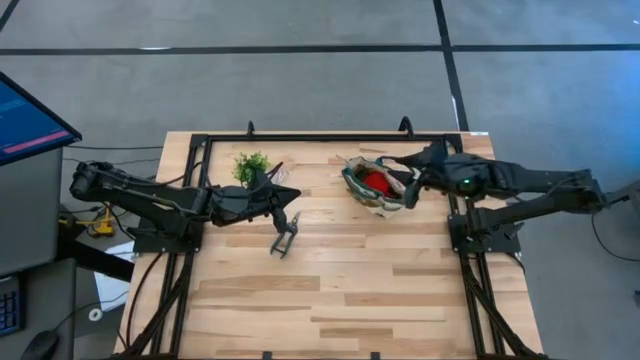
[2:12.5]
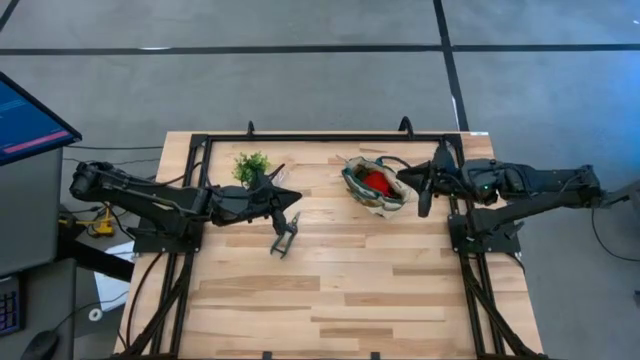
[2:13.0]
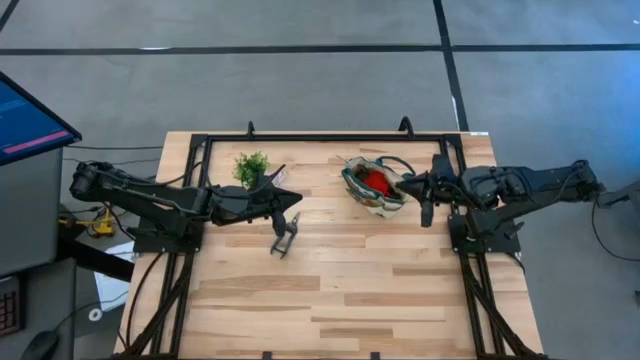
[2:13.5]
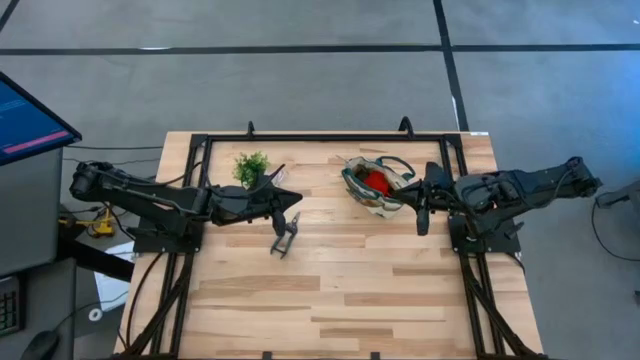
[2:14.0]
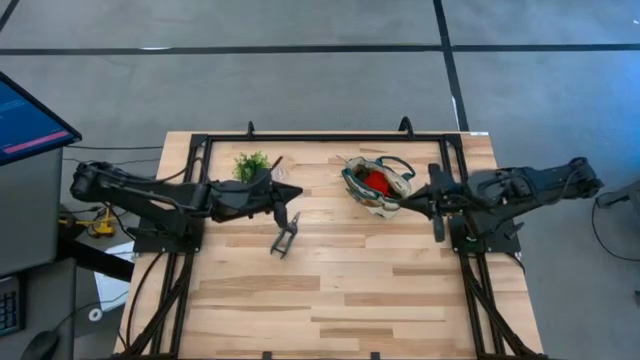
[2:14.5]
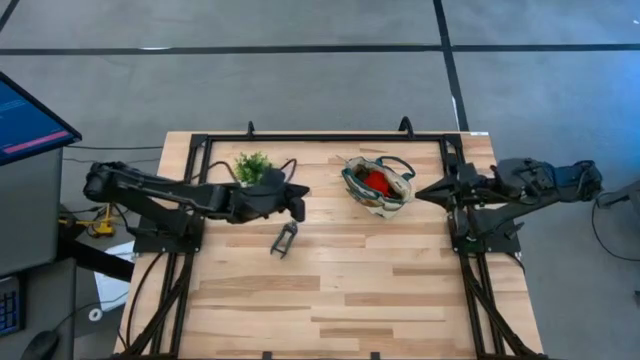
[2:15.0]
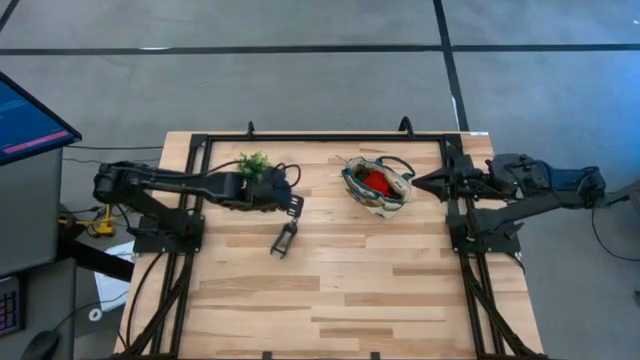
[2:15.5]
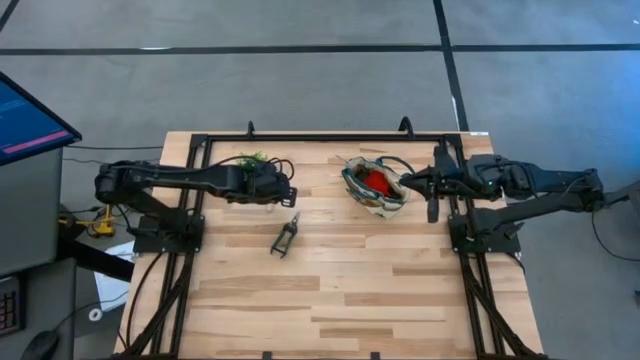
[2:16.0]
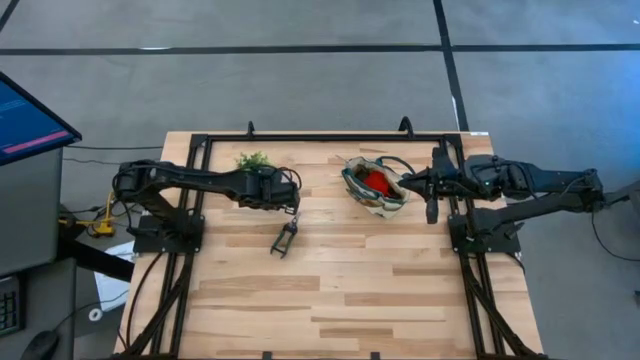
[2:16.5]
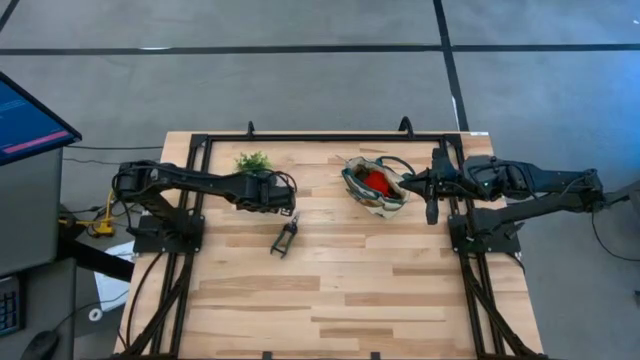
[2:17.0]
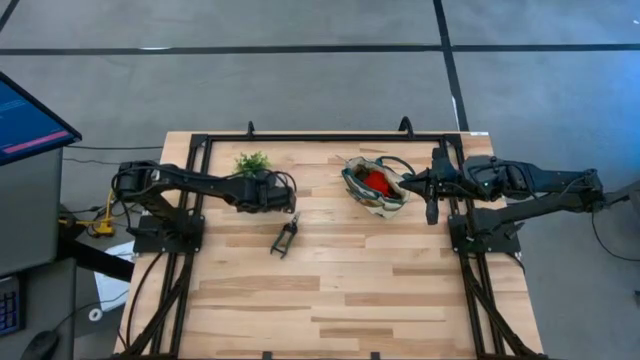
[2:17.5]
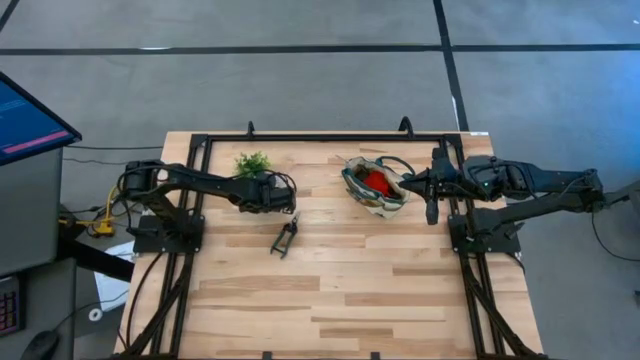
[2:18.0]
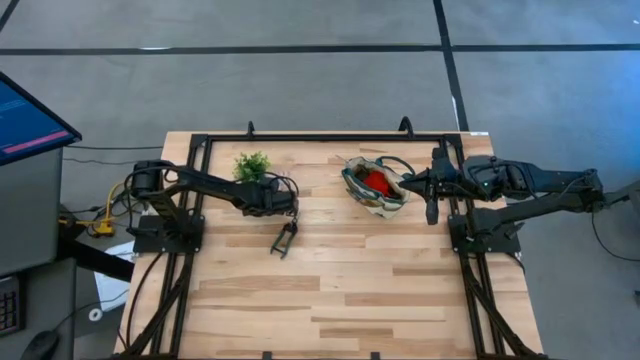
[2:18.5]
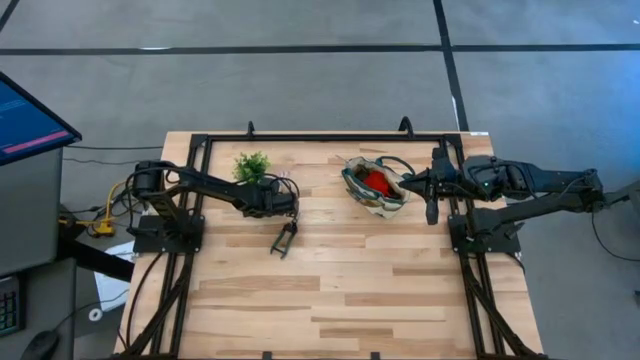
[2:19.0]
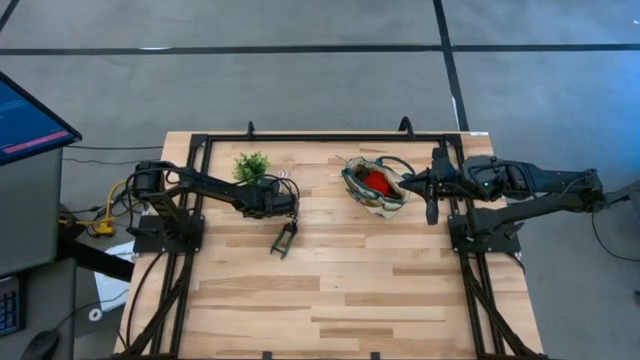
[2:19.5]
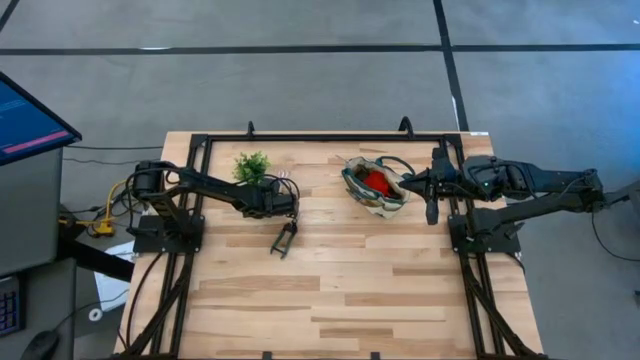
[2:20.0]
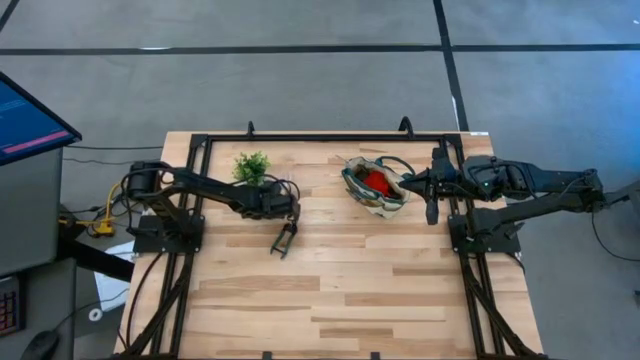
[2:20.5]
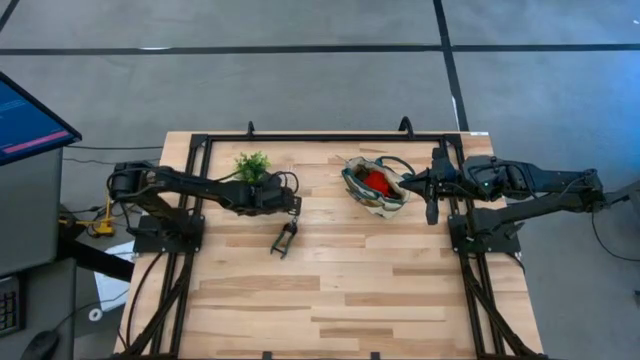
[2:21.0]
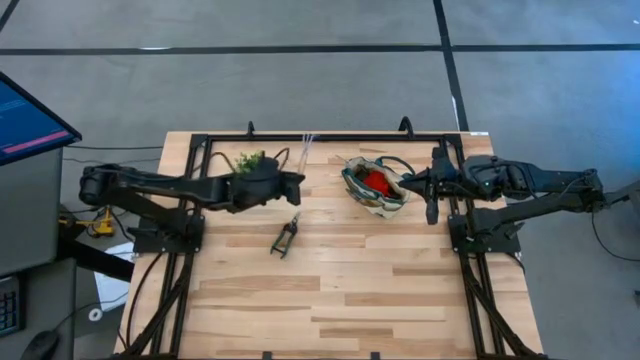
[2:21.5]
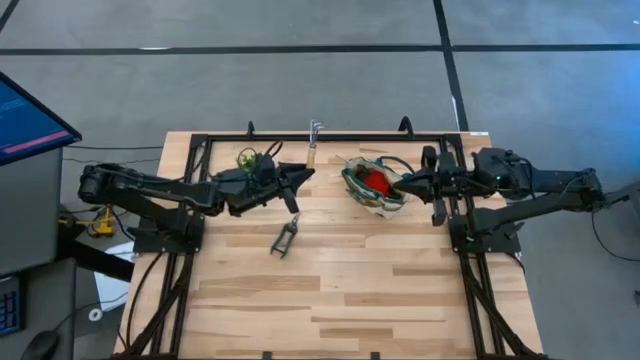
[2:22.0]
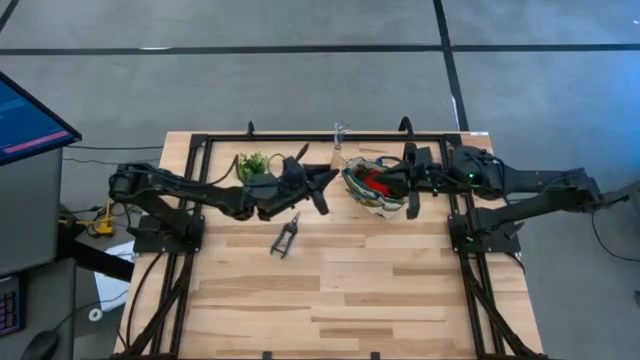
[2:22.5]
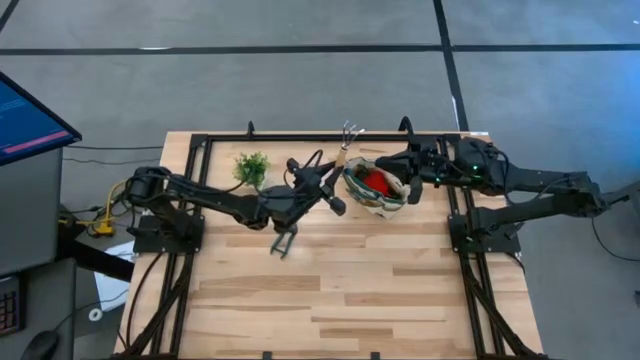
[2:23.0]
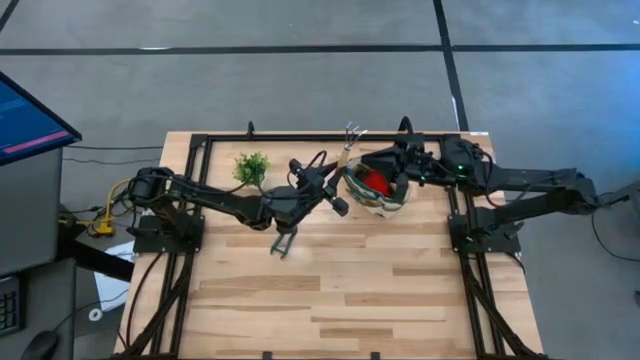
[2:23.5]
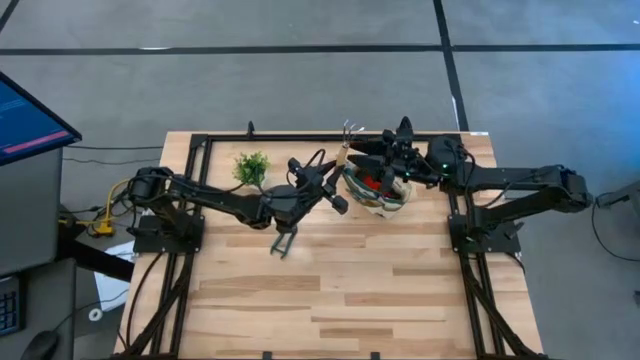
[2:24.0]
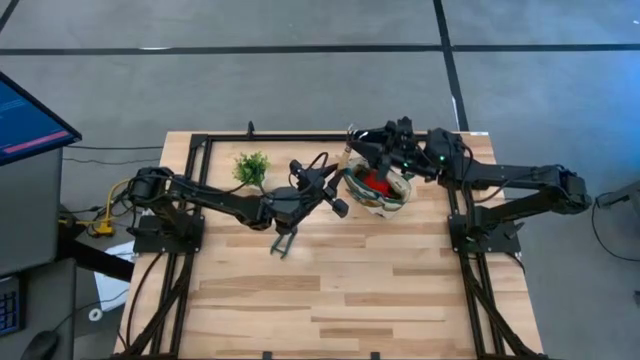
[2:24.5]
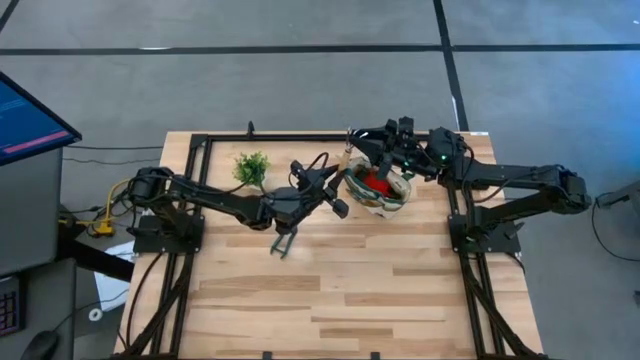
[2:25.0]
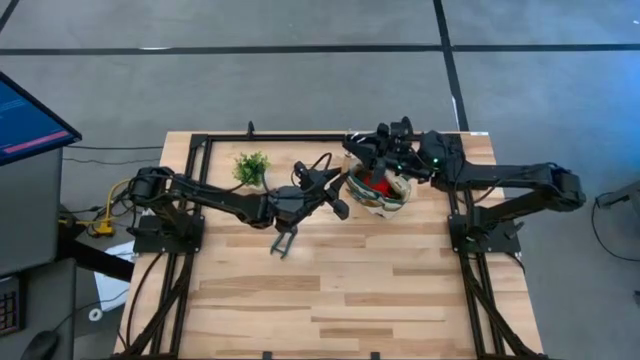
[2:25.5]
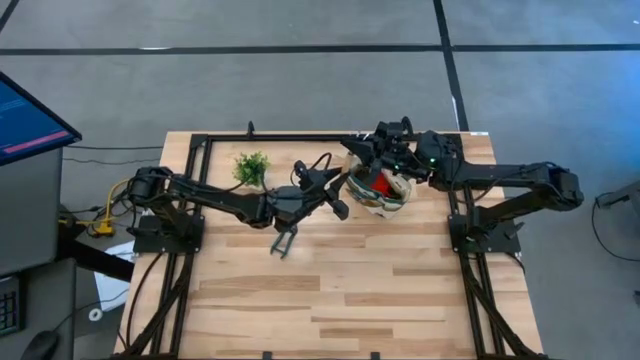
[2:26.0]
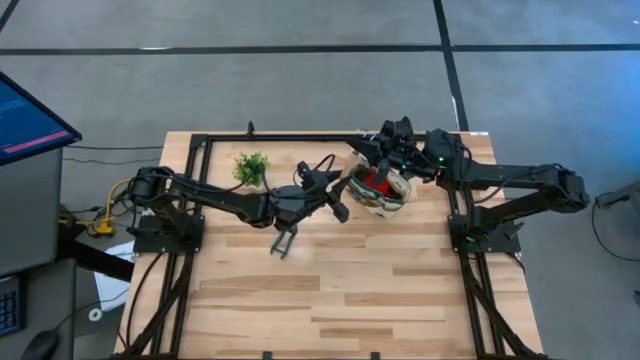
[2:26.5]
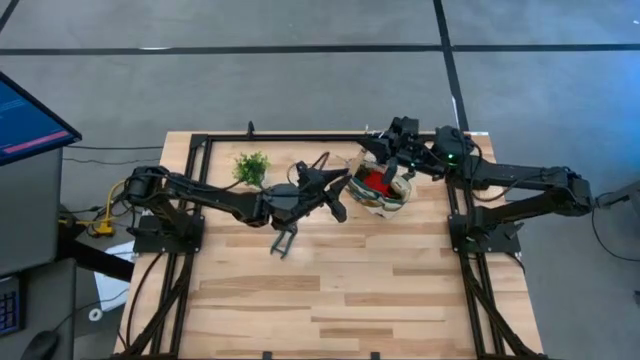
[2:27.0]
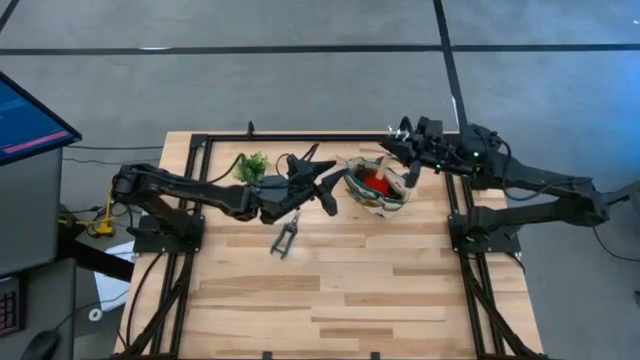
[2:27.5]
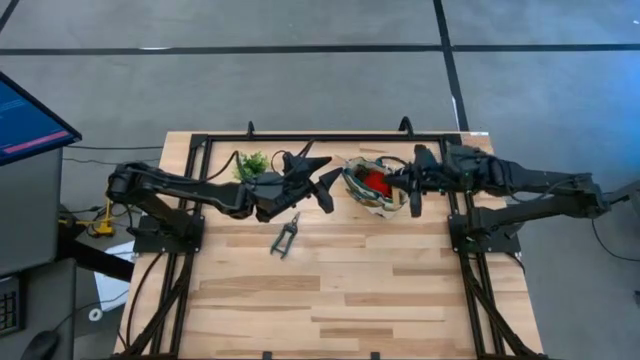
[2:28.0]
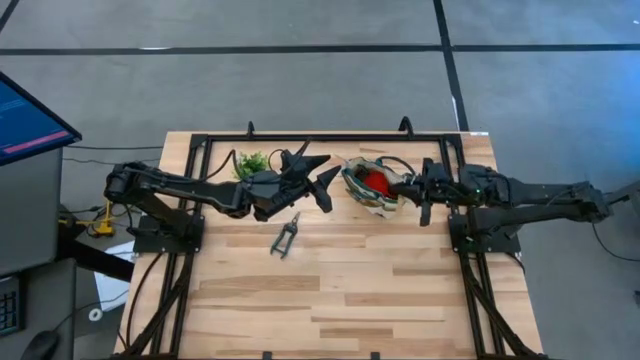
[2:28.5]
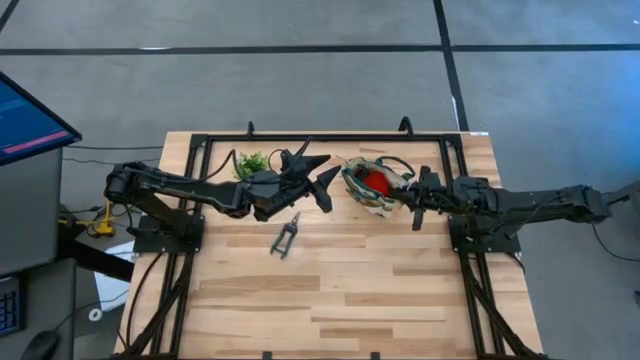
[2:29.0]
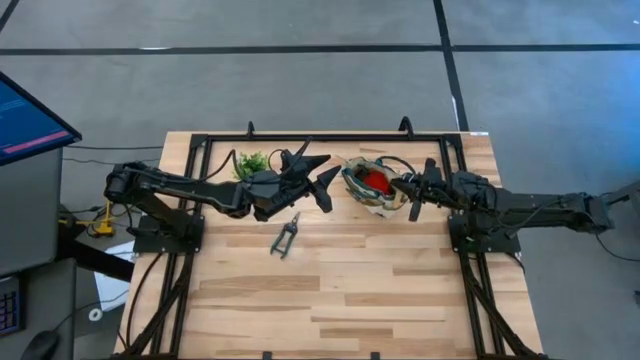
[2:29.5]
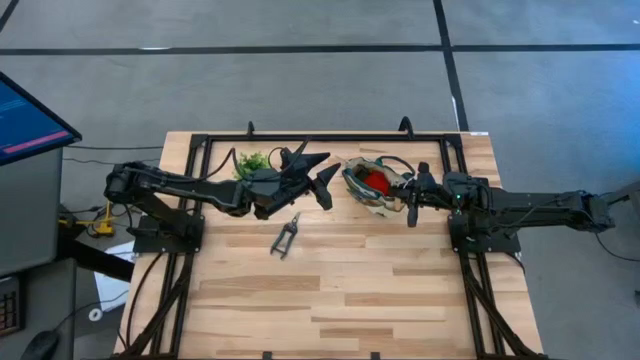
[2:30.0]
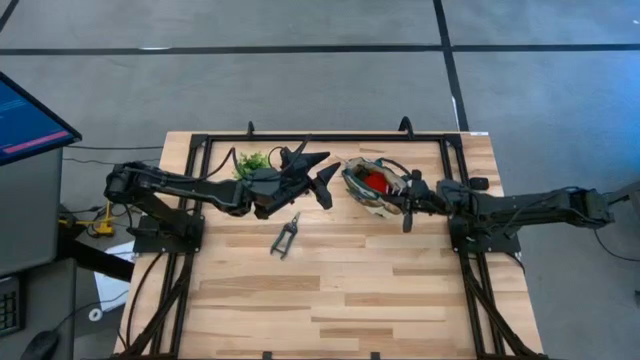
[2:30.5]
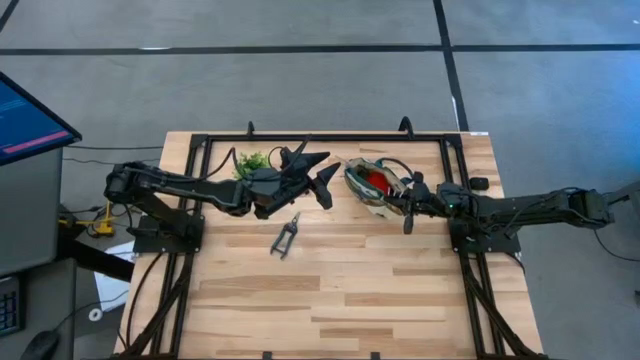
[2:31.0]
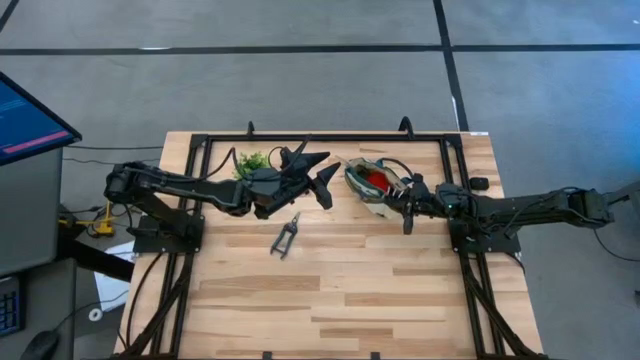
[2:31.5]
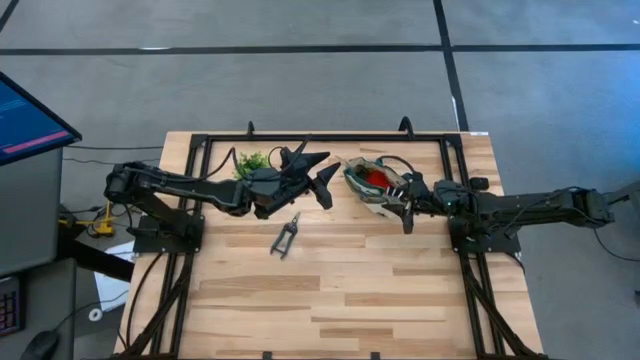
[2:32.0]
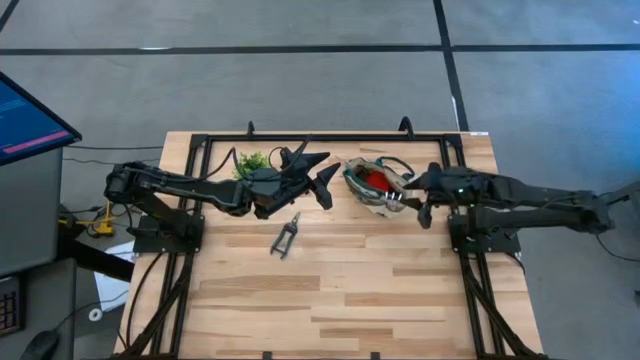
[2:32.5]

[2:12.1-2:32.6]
Task: Pick & Place Garden tools in Gardening bag
Put the hand rake into the side pocket of the gardening bag
